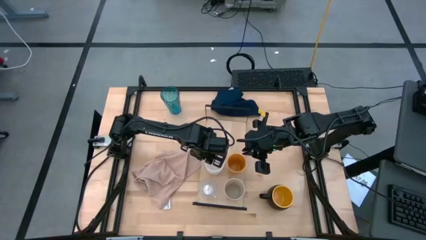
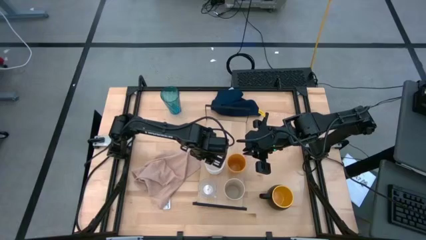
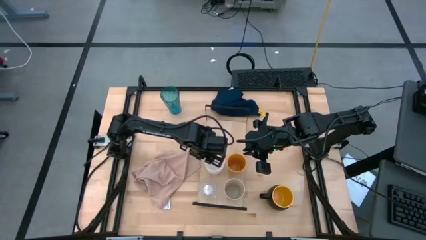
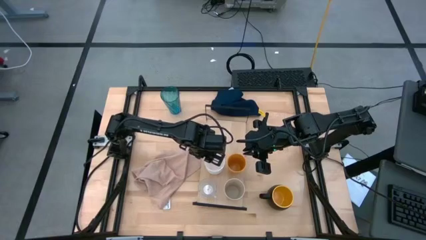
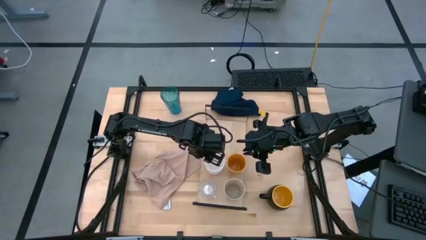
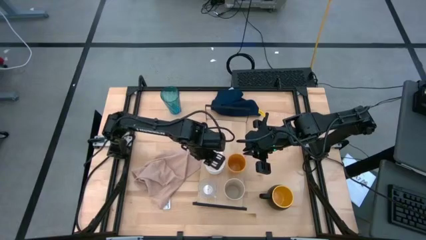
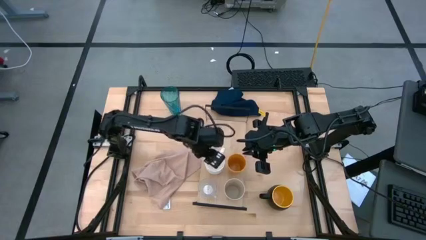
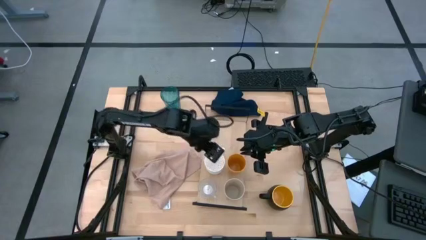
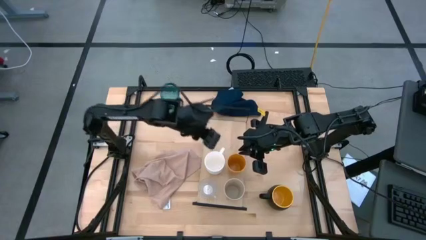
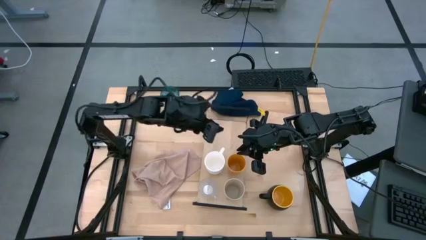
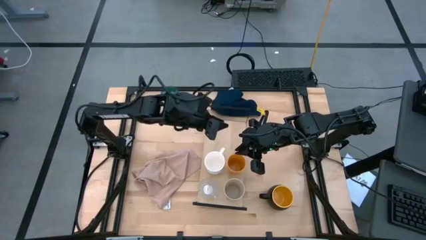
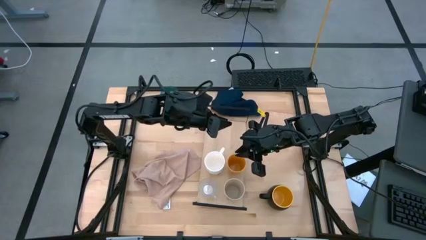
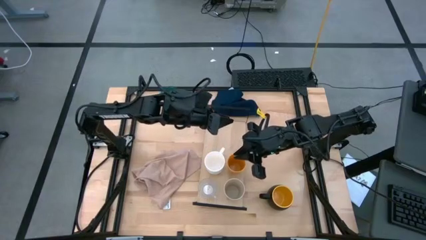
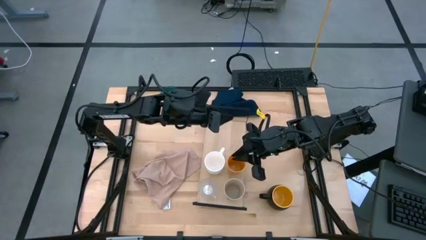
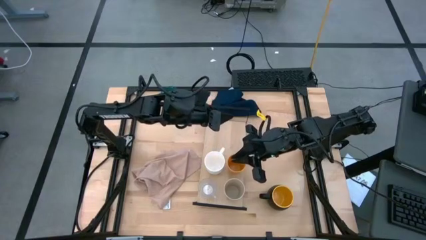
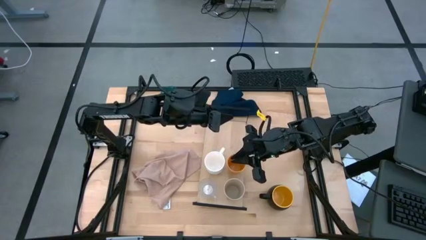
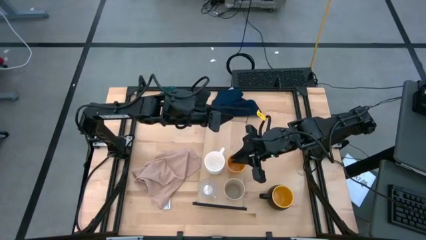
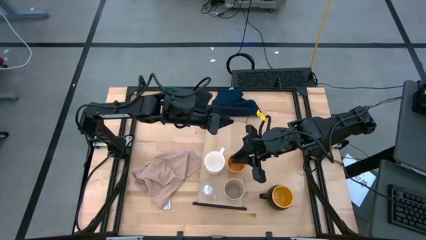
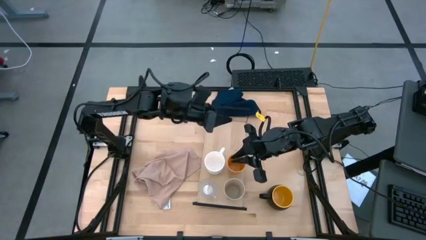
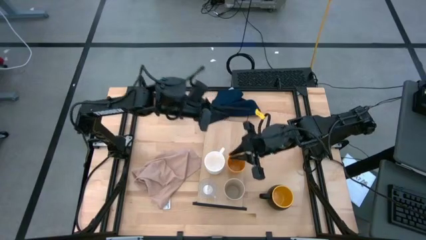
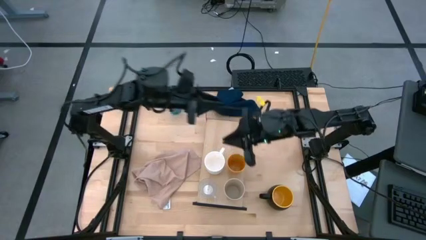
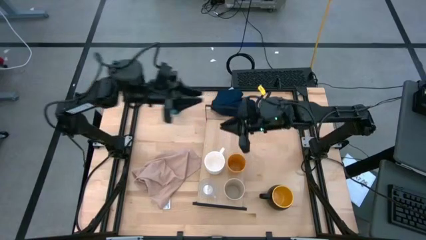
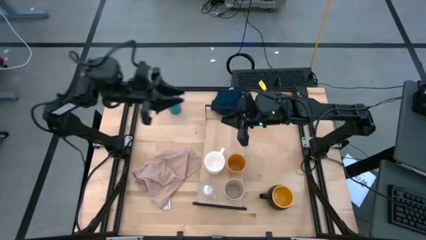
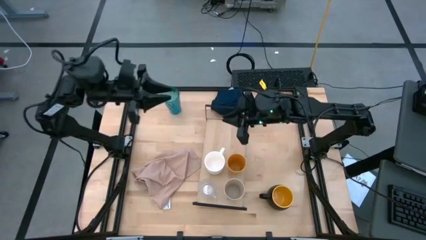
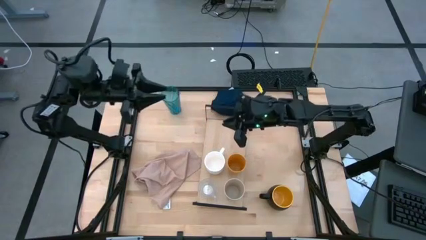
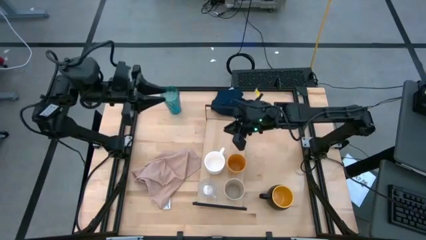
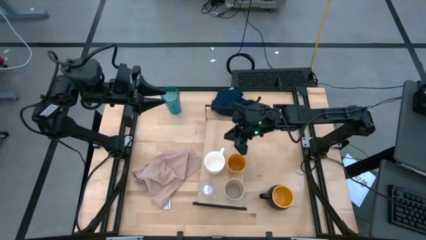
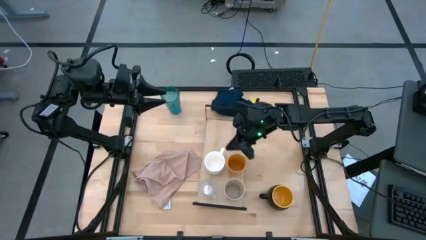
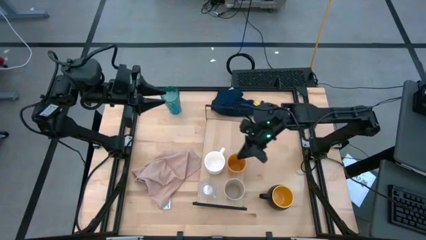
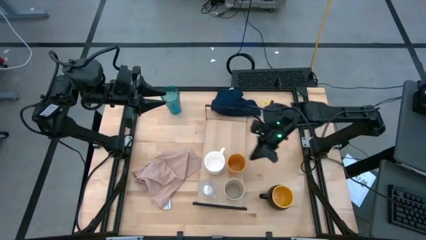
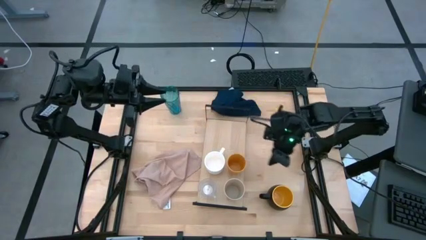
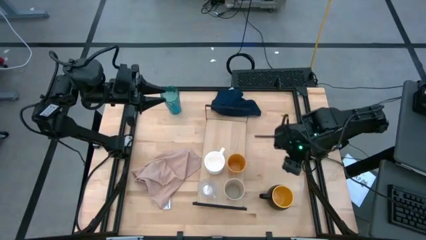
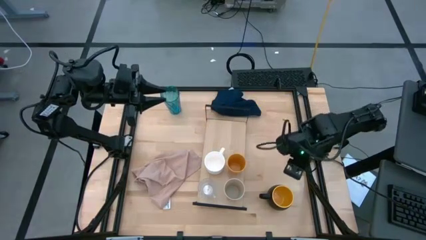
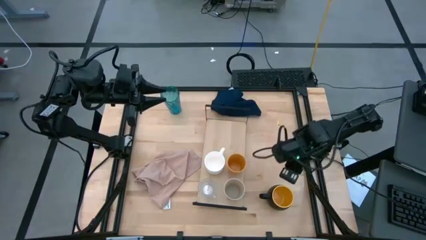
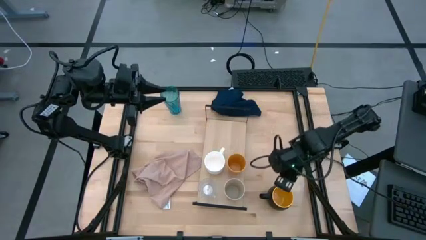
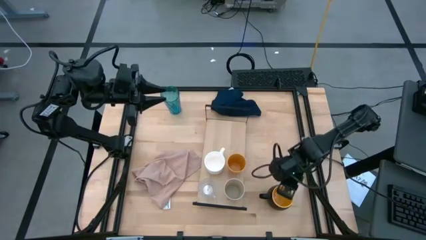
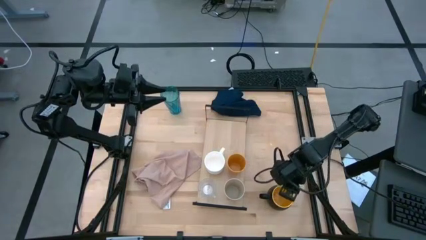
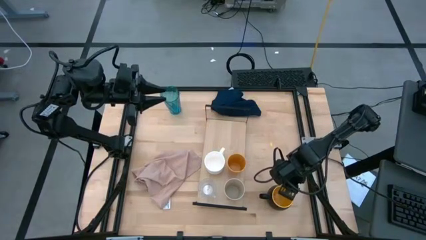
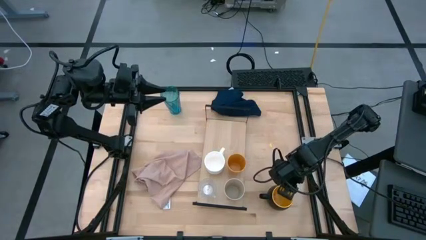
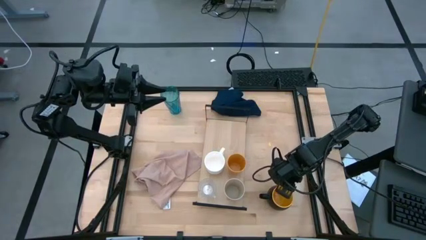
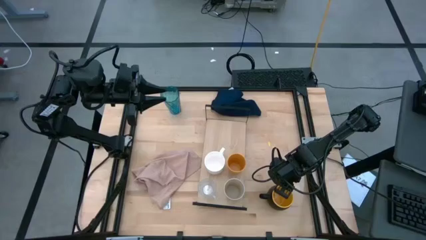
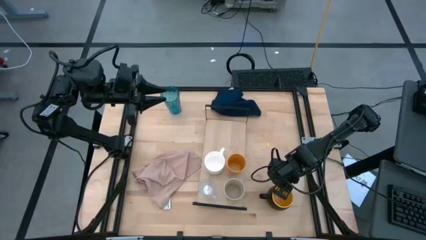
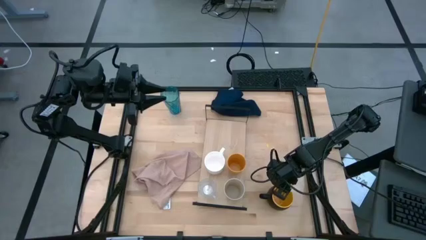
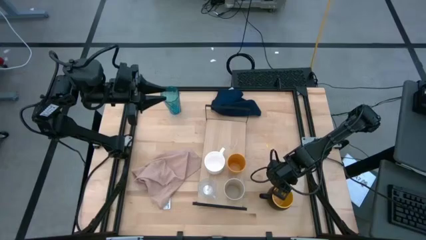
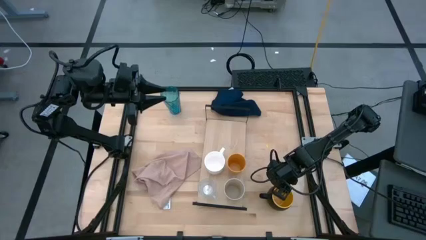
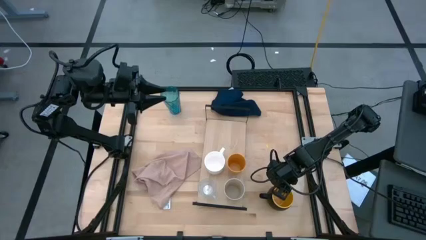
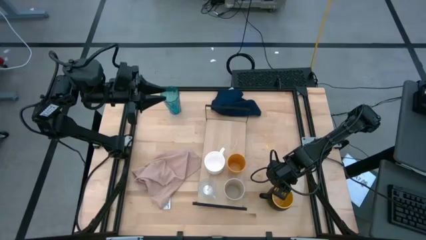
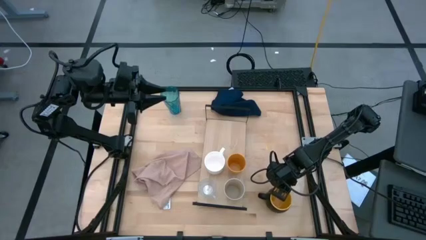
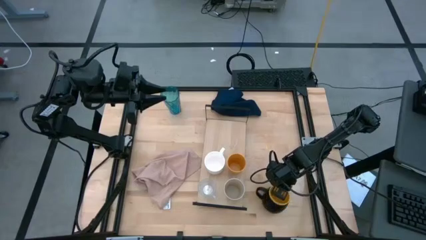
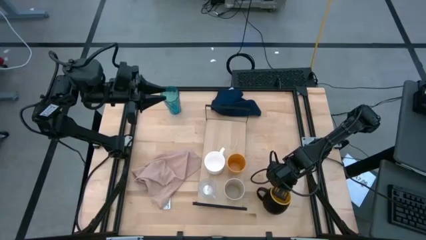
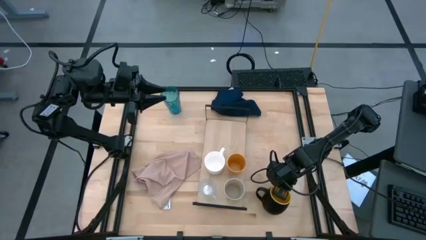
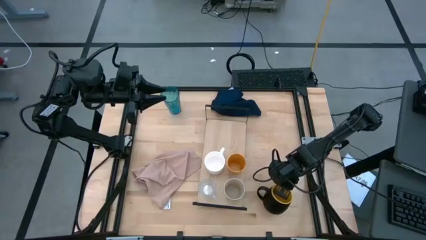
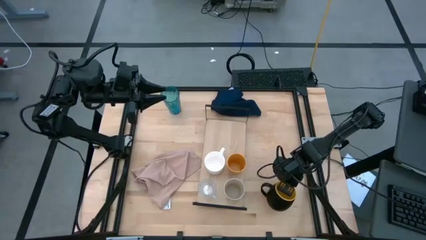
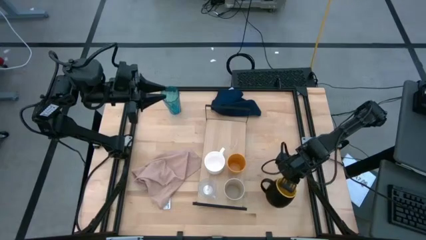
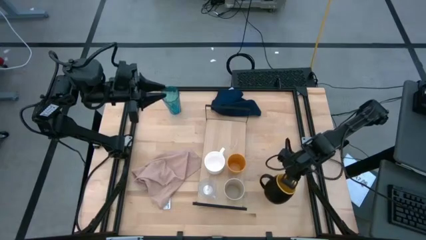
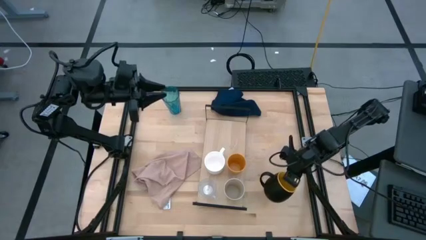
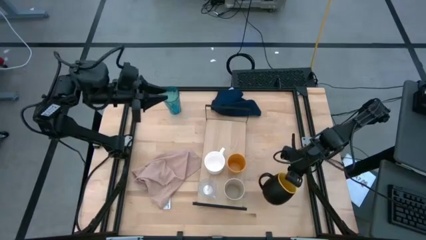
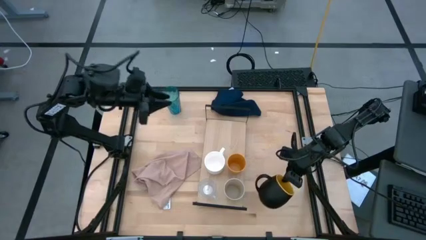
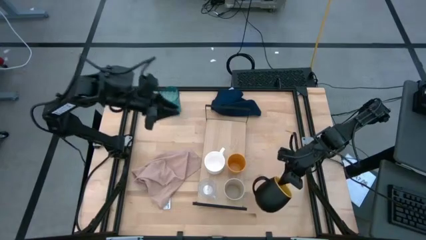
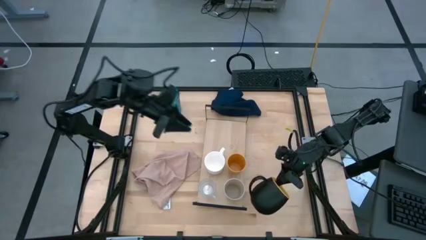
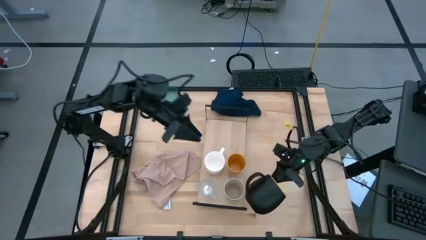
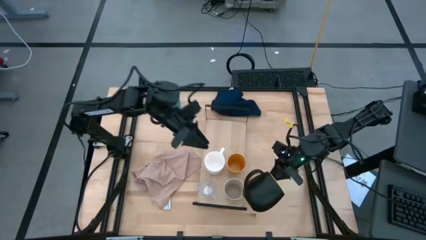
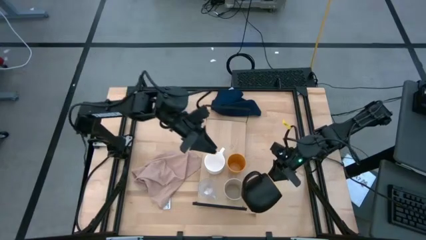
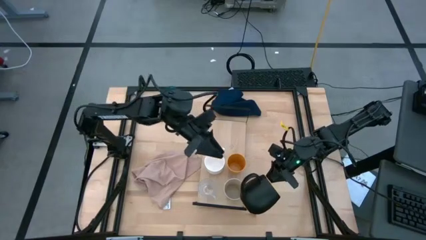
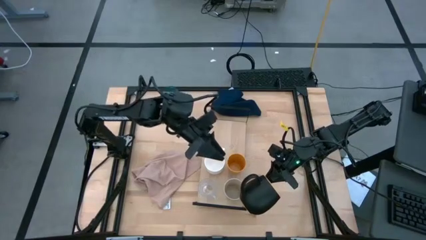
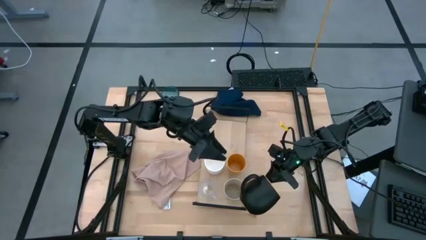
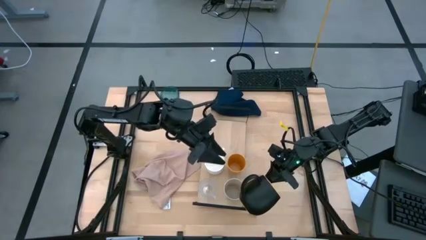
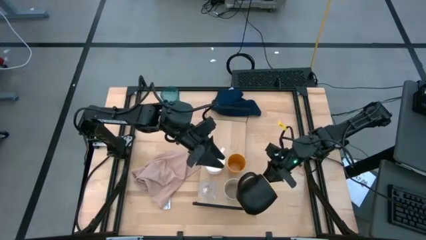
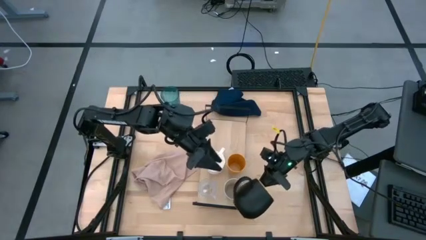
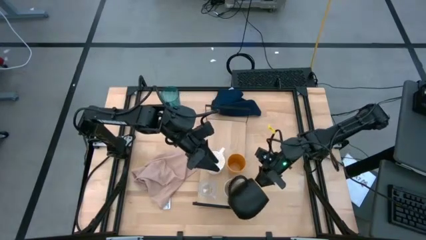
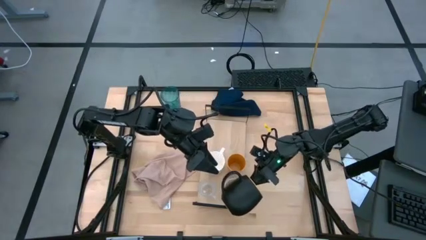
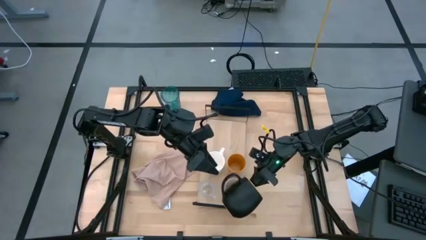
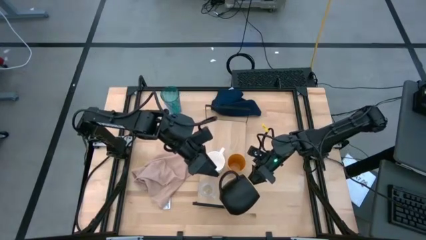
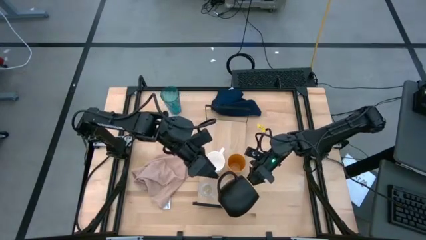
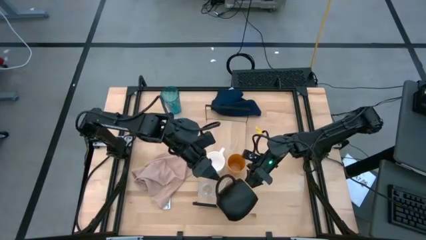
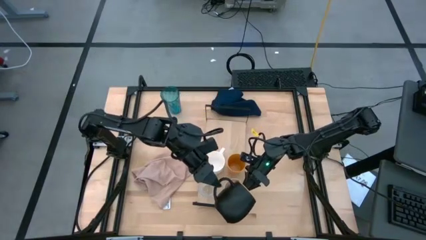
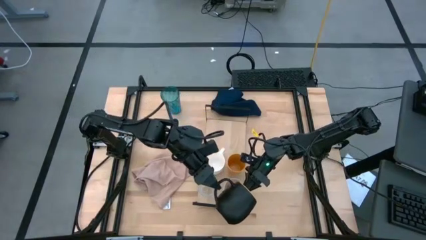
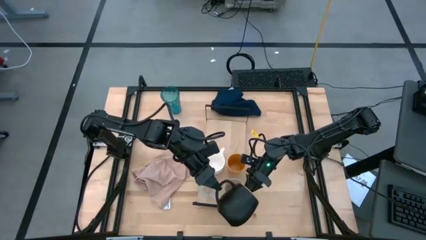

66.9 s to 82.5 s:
Task: Stack small to large cups/mugs on shelf
Put the black cup on the shelf aligned with the white cup

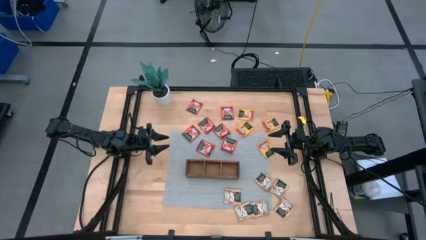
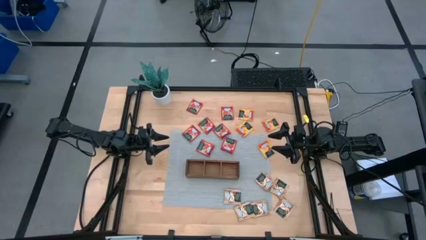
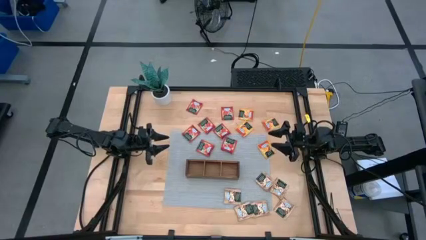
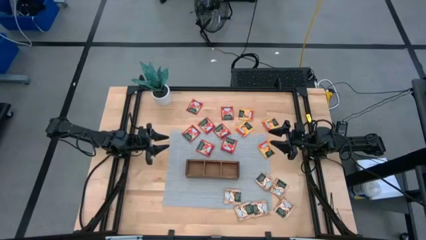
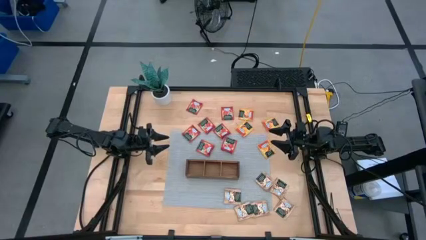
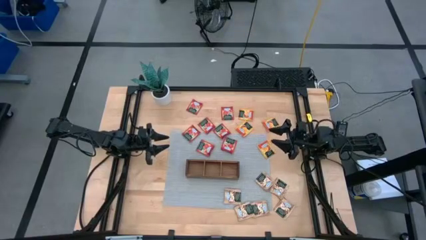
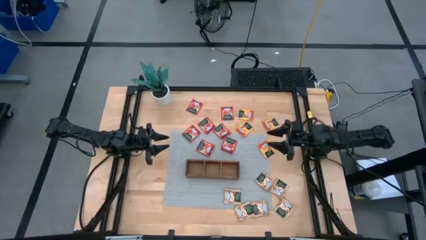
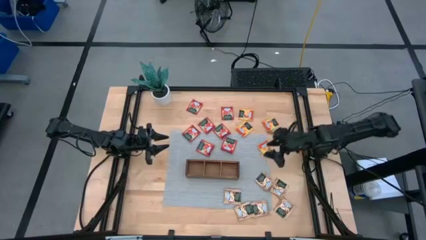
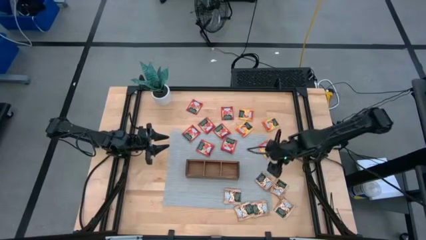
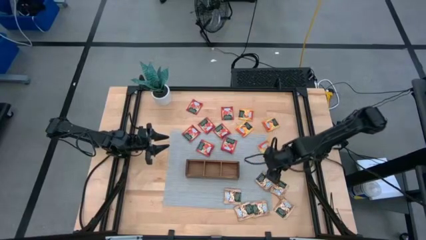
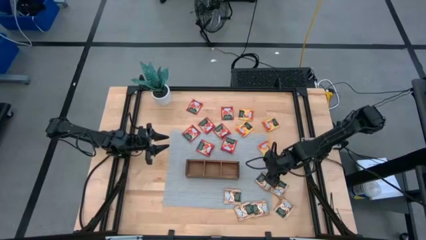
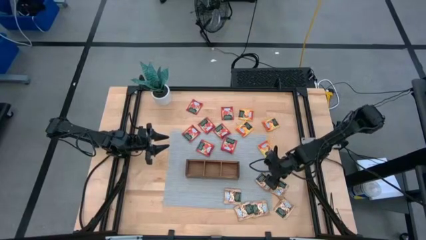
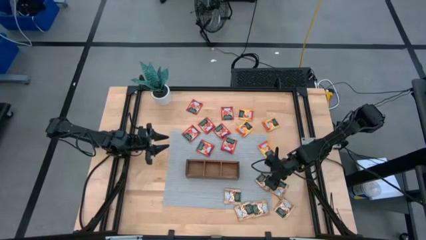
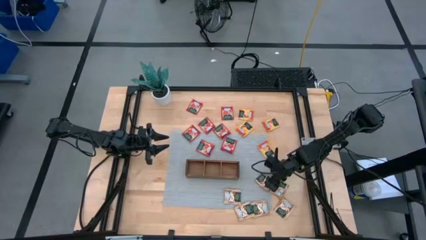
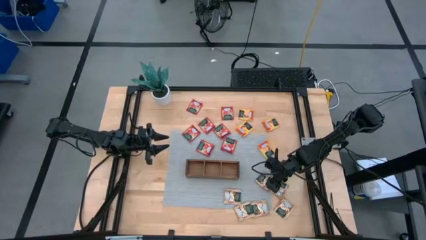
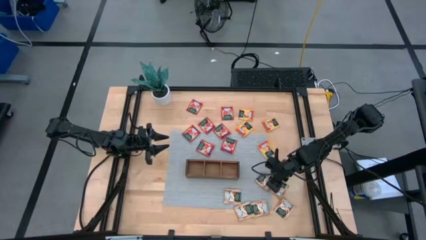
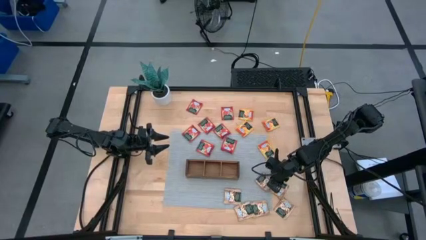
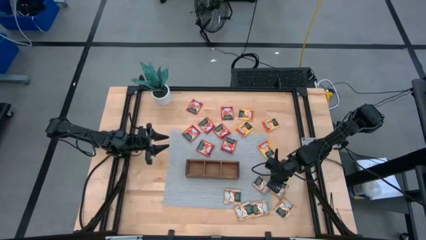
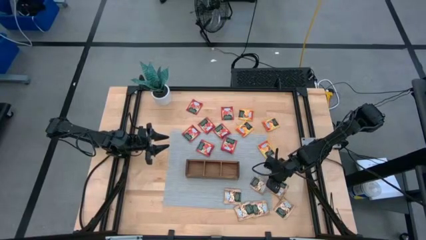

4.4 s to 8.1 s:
Task: Pick & Place Tea
Put the brown tea bag into the right compartment of the wood organizer
